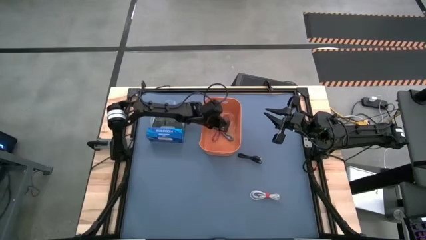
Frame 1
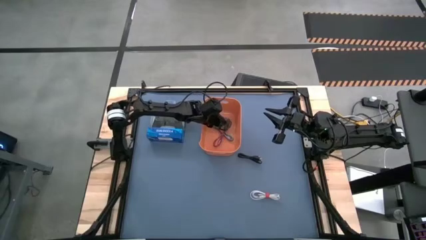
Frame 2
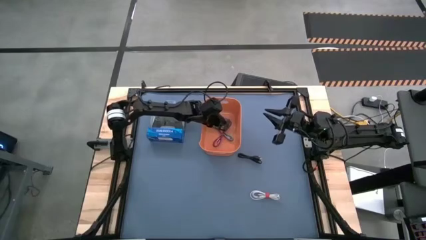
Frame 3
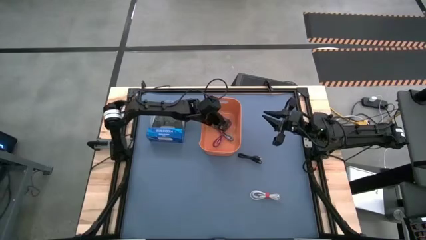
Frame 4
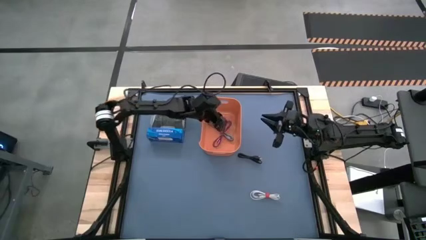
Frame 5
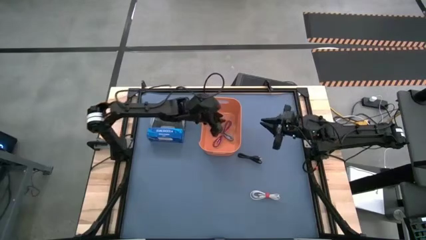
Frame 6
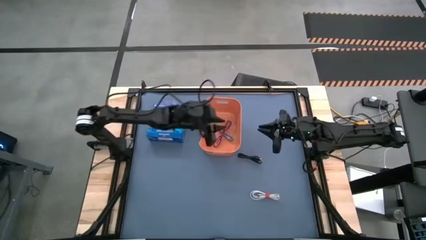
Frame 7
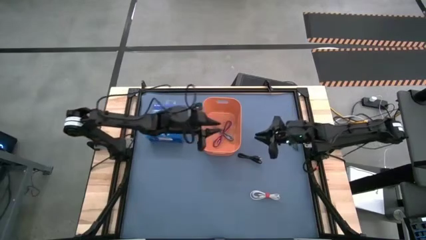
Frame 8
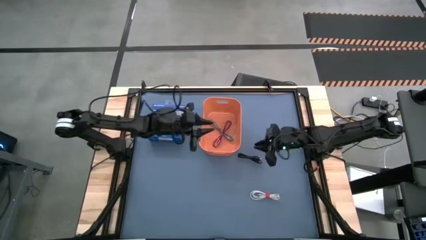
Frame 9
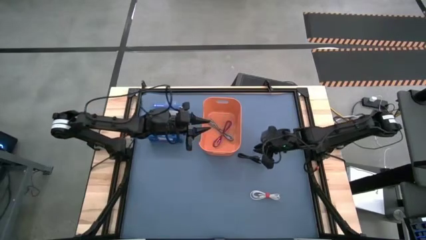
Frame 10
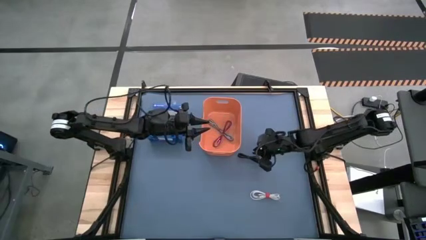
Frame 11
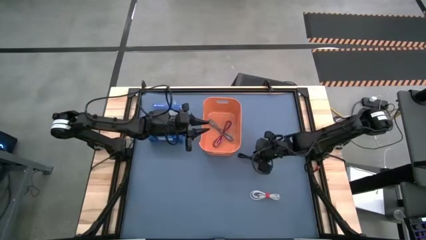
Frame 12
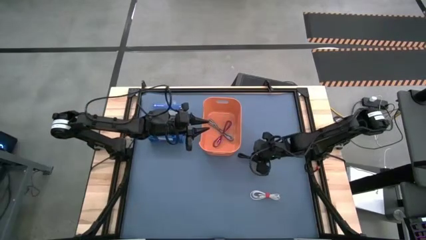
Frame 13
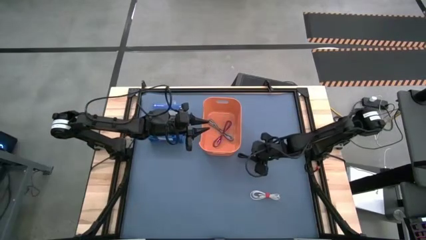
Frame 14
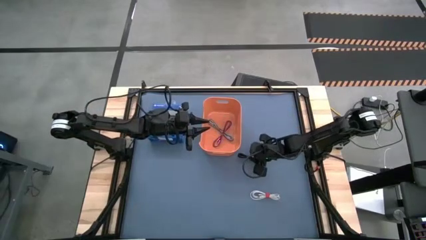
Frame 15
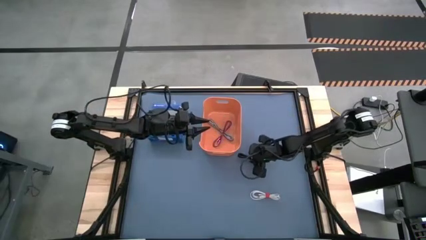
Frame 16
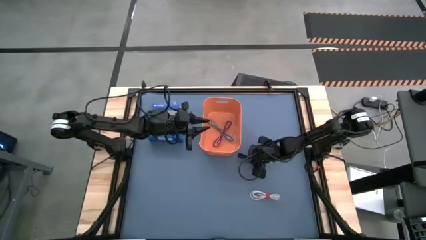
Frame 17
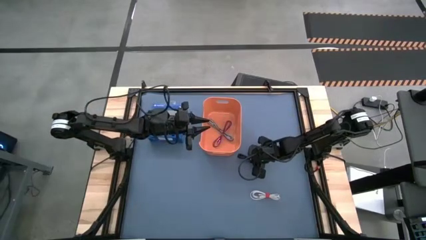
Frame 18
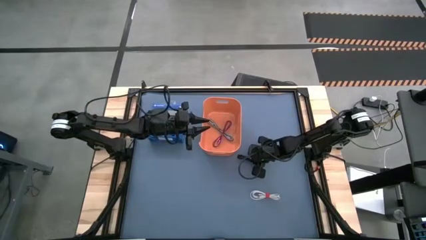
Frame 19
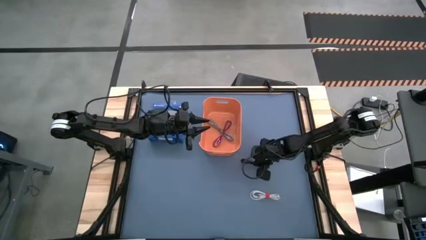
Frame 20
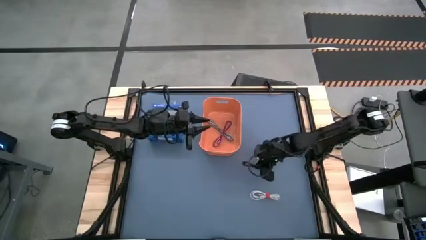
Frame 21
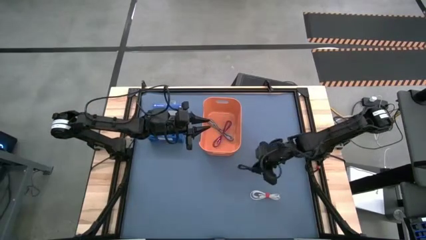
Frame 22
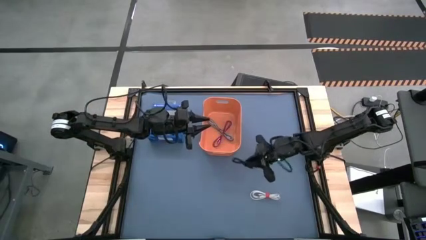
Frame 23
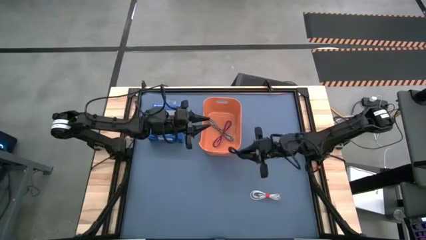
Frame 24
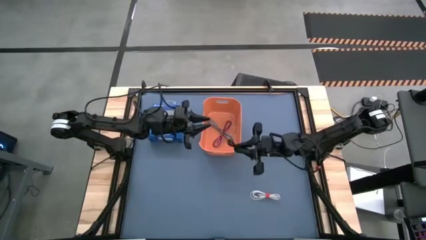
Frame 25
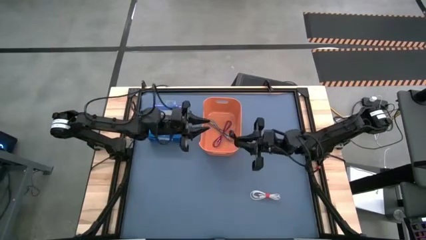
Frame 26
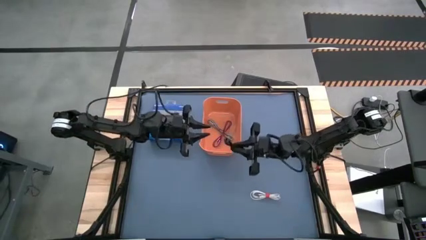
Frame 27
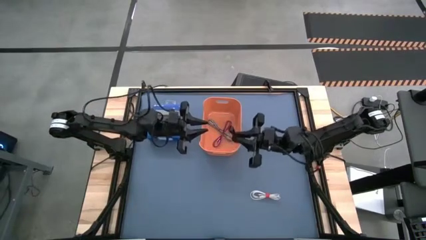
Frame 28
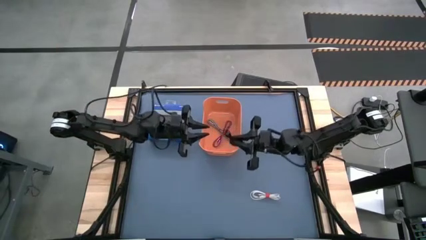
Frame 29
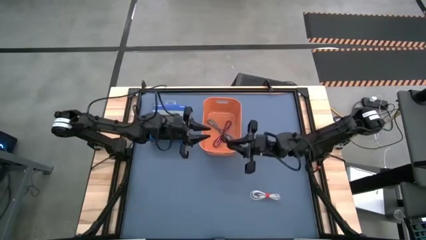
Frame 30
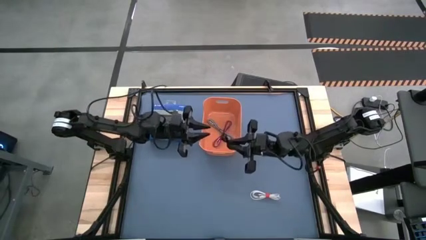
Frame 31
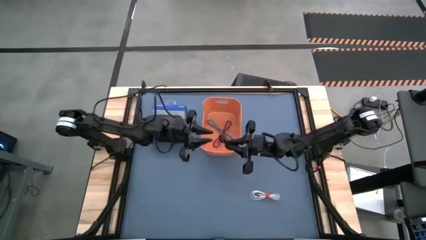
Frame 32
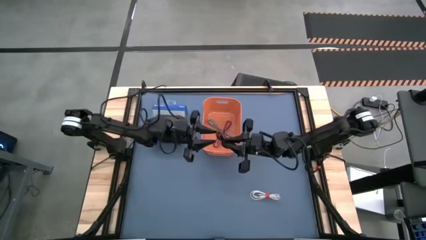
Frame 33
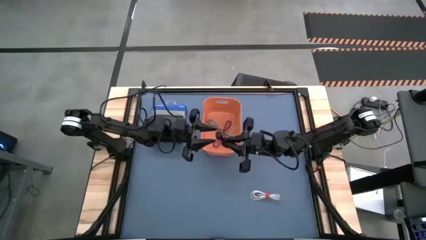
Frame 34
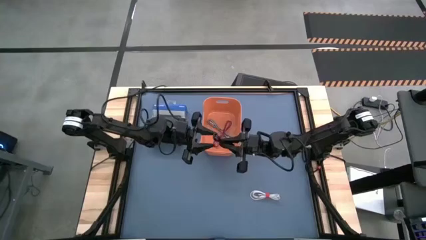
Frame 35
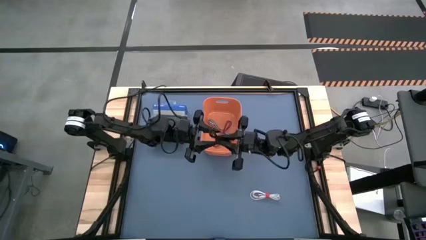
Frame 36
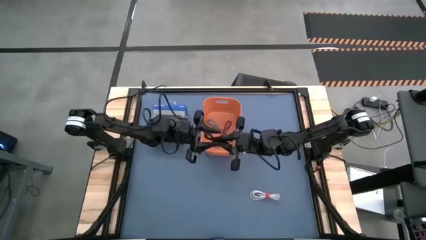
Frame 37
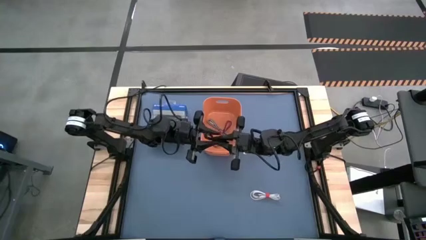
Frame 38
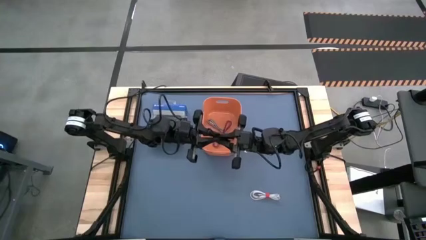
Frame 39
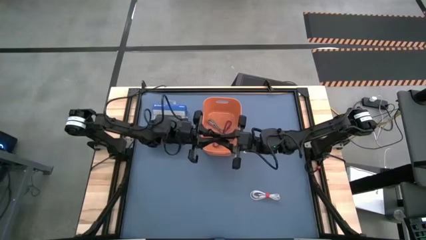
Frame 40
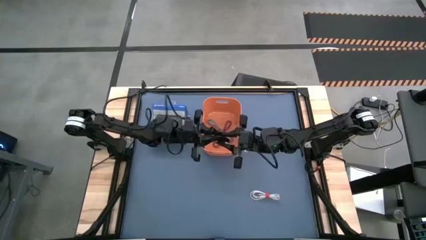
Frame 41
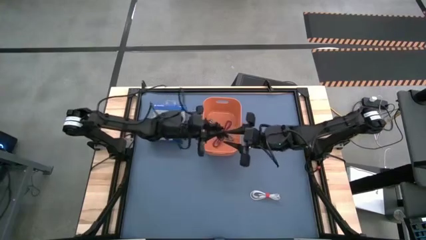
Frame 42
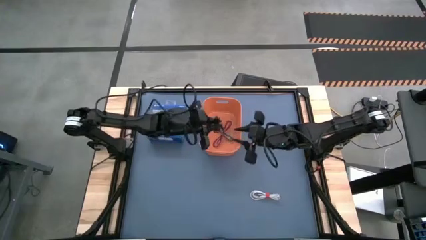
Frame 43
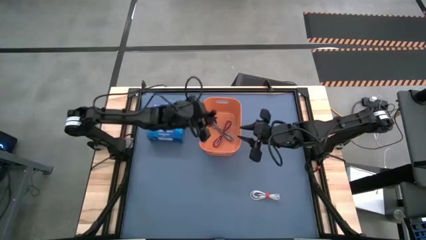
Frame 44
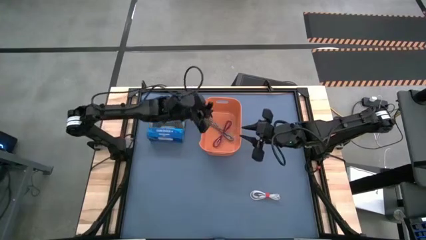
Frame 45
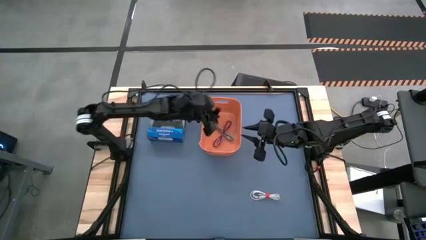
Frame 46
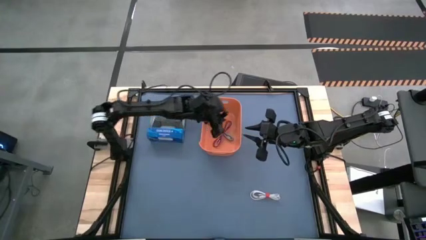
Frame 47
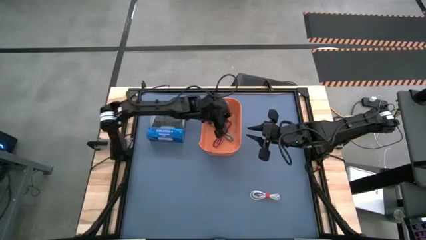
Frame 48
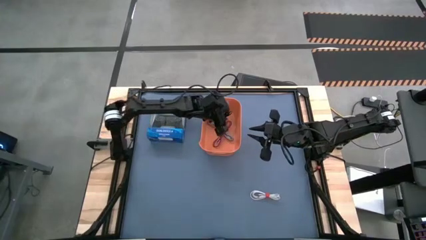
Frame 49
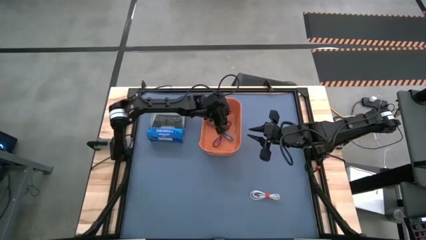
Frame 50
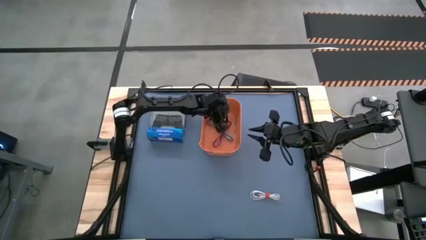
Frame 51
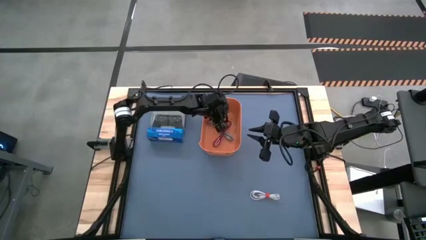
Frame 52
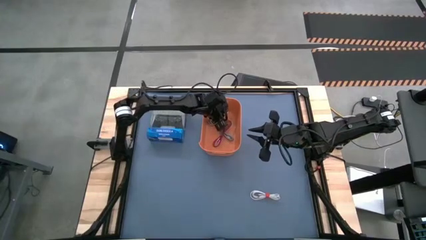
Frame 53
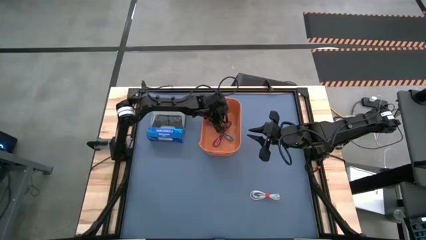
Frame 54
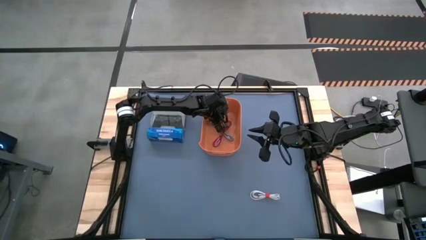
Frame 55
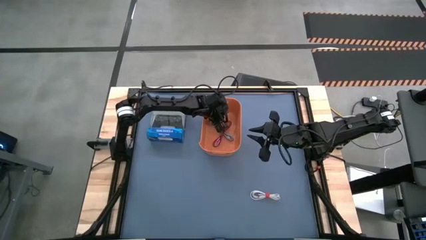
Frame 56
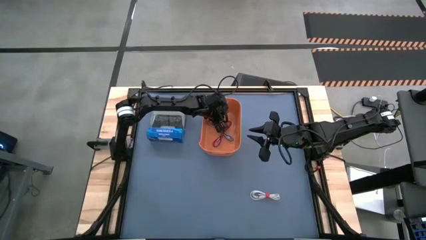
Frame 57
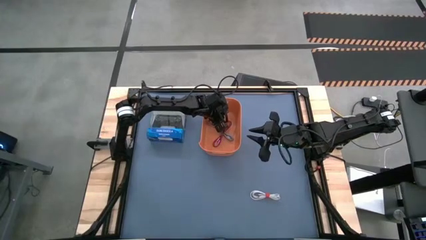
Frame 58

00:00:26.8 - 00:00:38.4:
Task: Pick and place USB-C Cables
Put the black charger cable into the orange bin

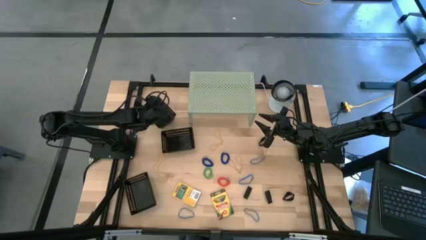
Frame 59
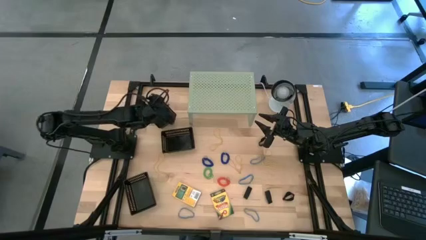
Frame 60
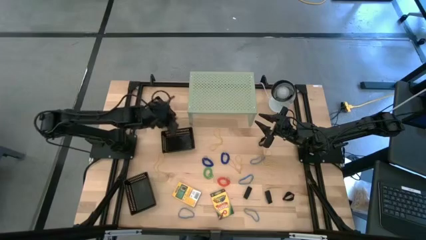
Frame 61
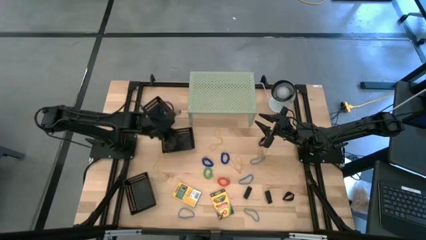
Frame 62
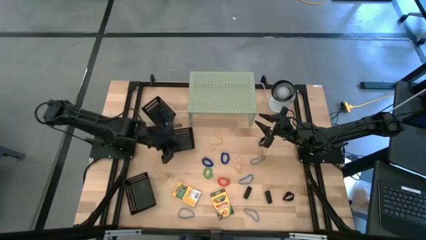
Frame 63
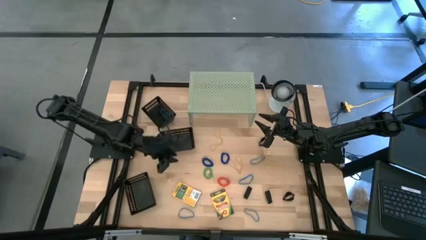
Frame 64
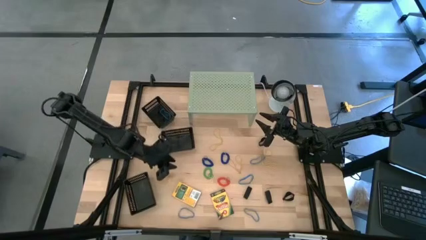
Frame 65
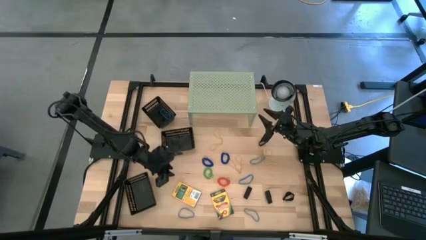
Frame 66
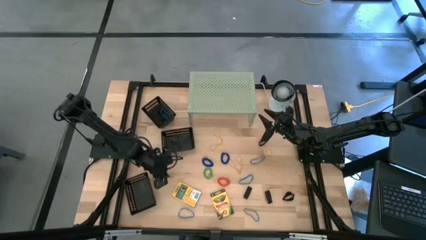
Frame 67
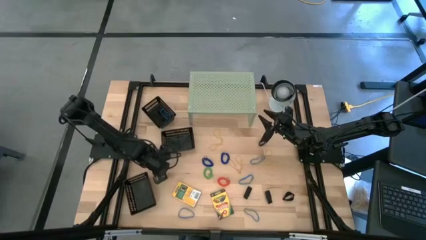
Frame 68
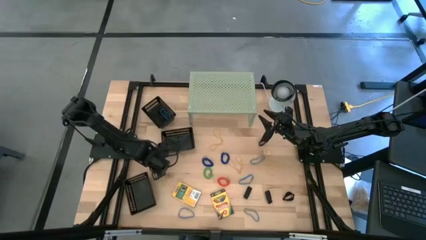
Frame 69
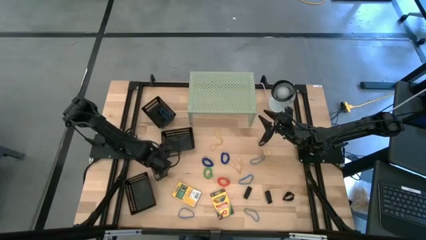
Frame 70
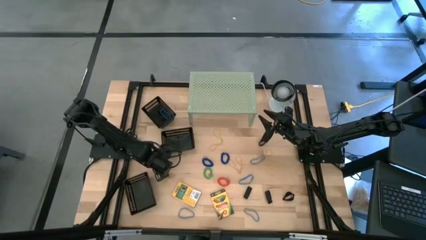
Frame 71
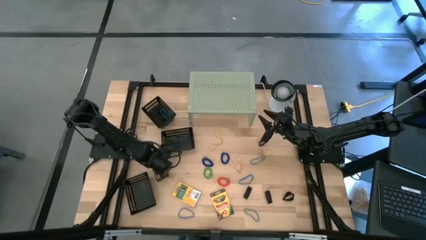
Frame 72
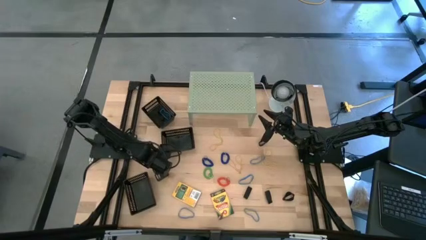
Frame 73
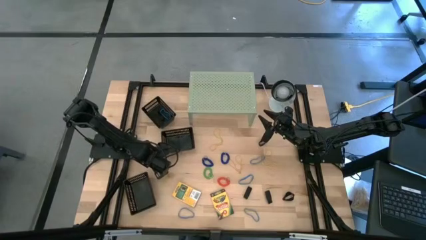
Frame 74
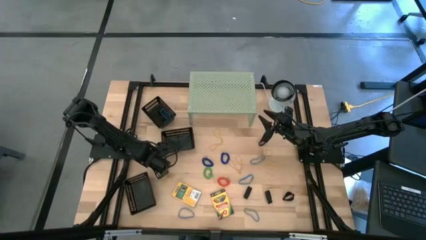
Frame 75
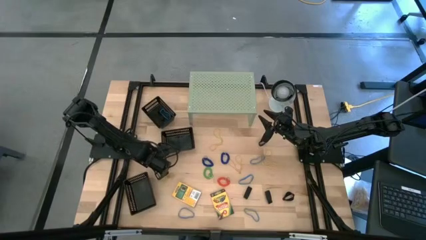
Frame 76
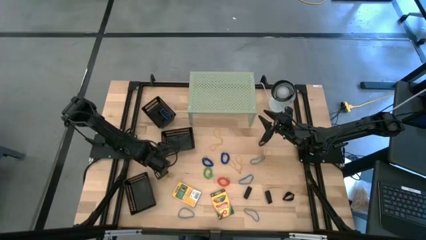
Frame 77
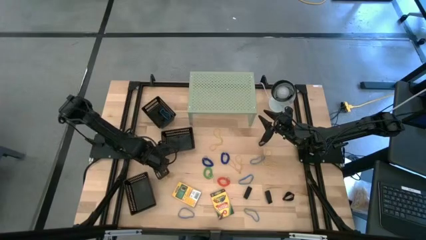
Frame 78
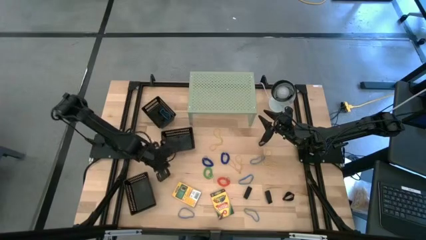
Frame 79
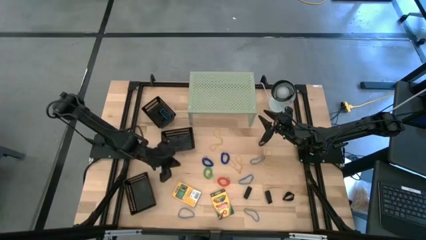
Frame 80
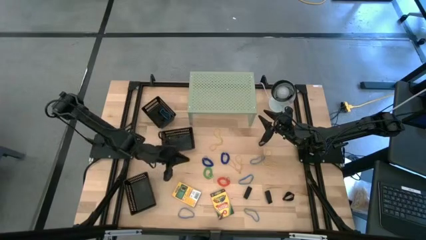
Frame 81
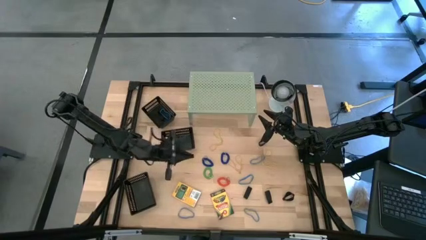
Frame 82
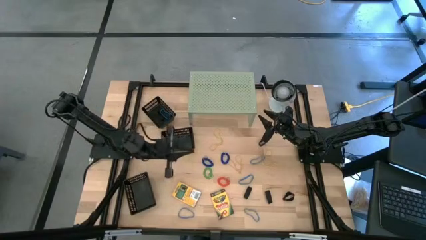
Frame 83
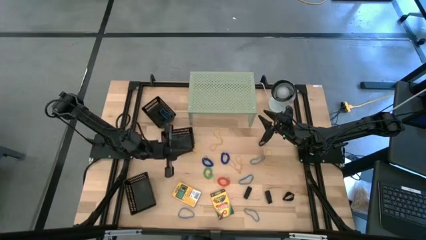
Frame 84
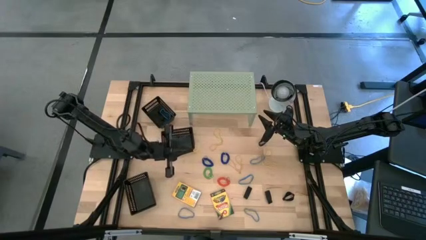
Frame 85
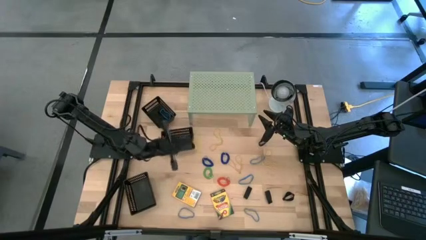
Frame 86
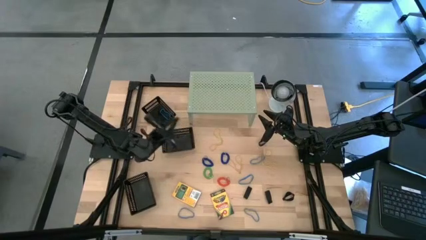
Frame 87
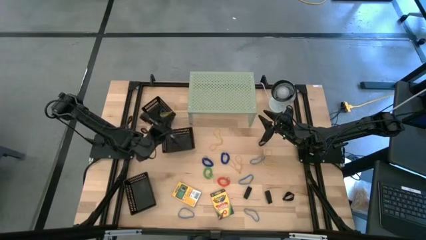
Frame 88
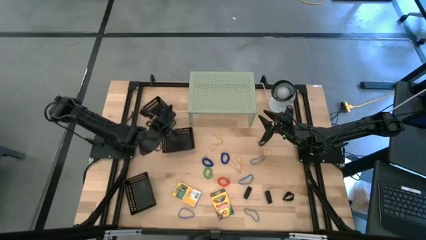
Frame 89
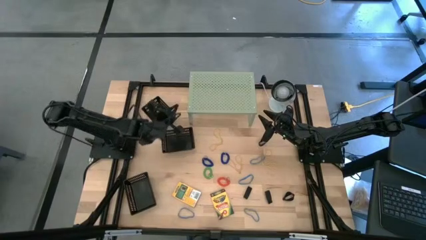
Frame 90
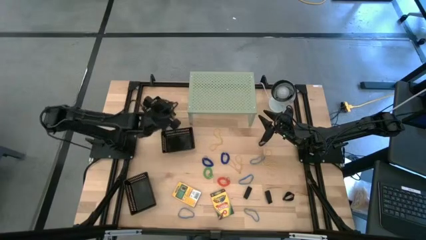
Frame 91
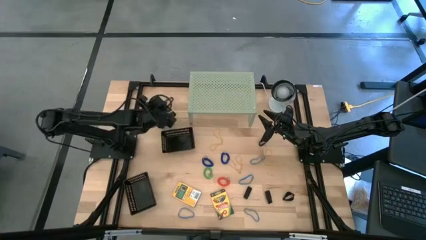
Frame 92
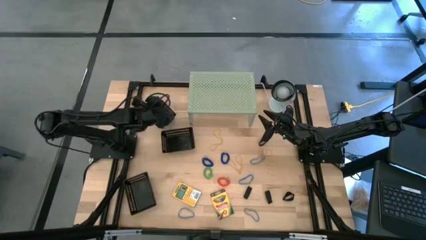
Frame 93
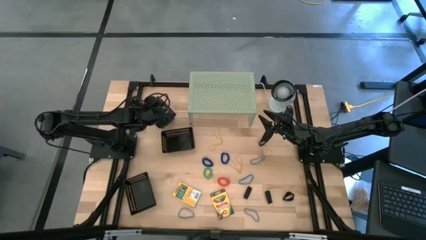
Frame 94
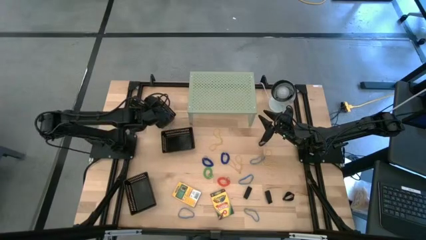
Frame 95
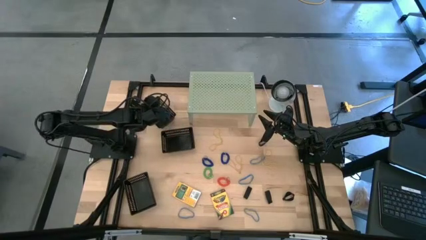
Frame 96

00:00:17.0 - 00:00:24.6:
Task: Pick & Place Office Desk Supplies
Put the yellow rubber band into the top black bin
